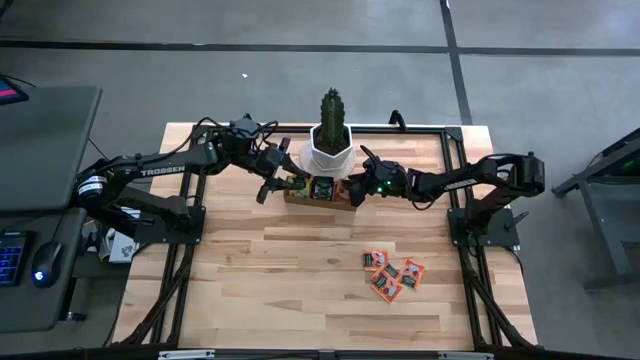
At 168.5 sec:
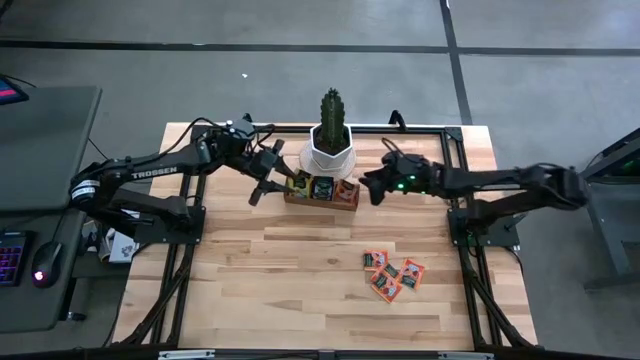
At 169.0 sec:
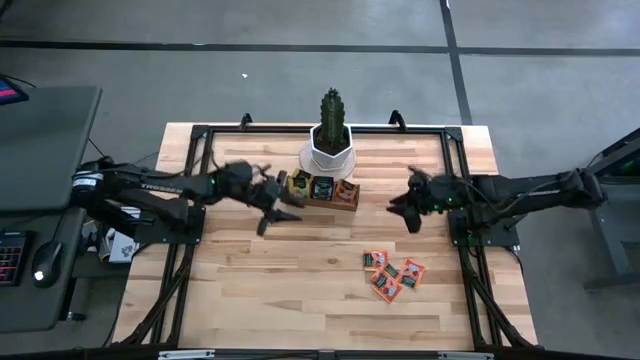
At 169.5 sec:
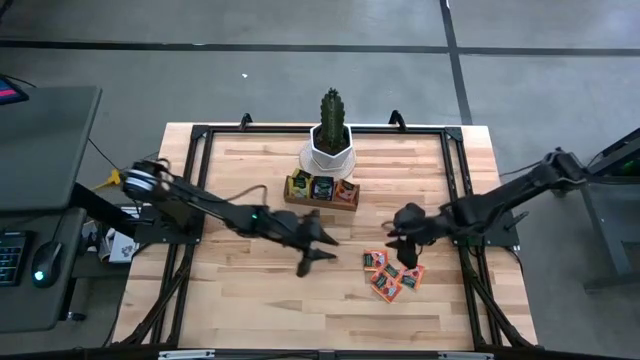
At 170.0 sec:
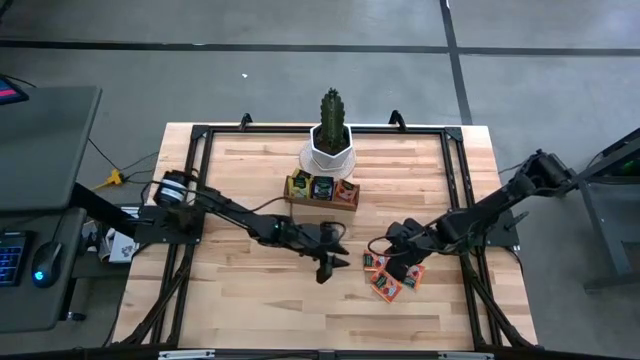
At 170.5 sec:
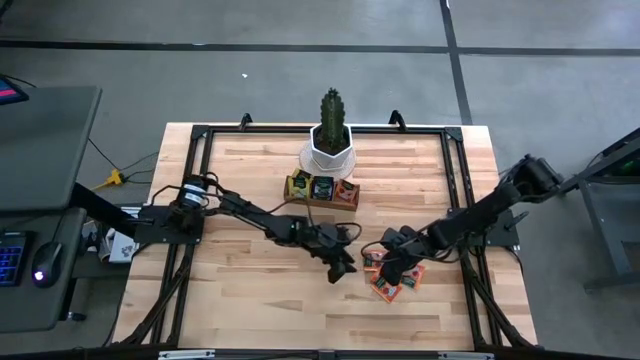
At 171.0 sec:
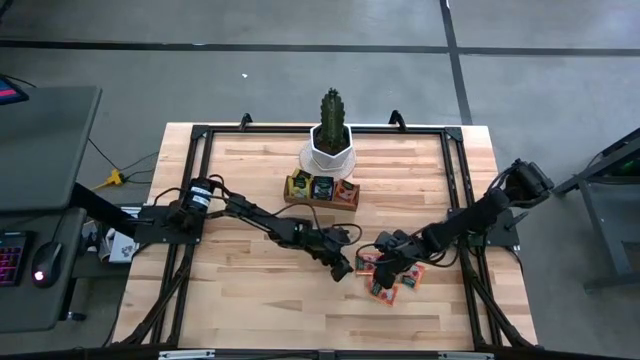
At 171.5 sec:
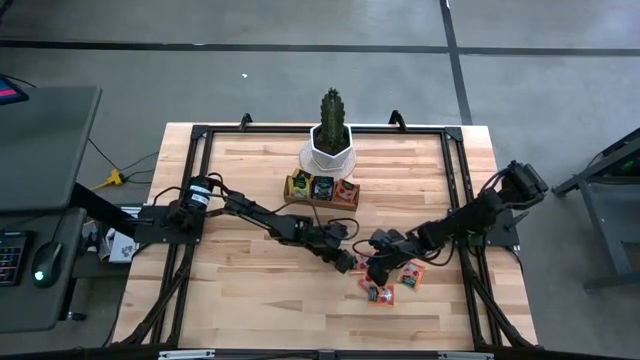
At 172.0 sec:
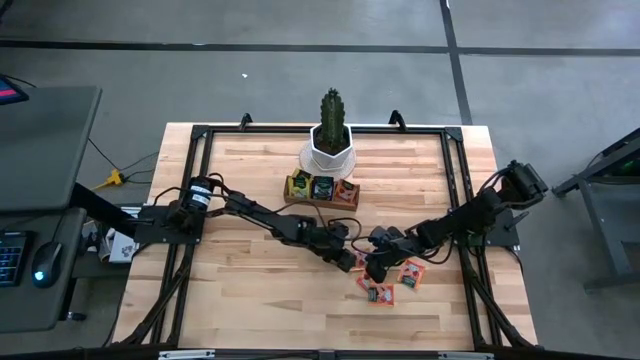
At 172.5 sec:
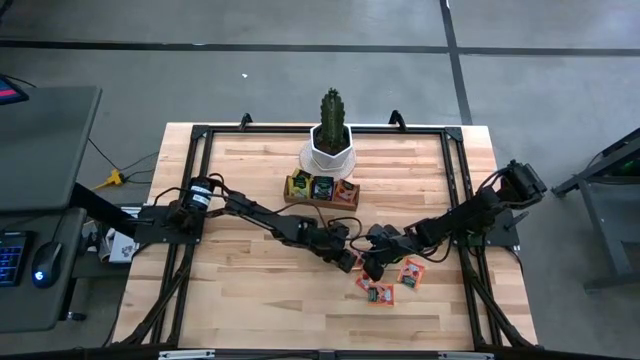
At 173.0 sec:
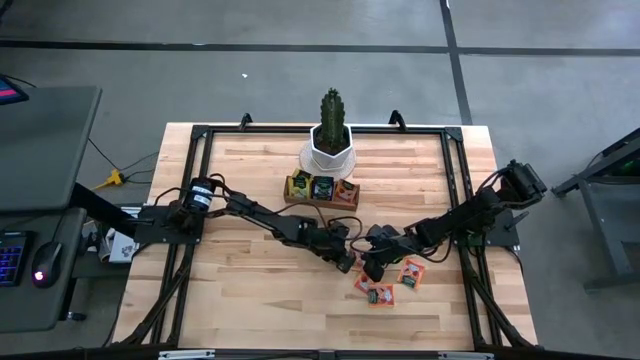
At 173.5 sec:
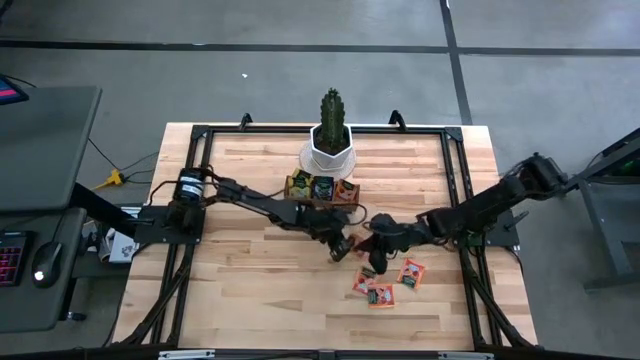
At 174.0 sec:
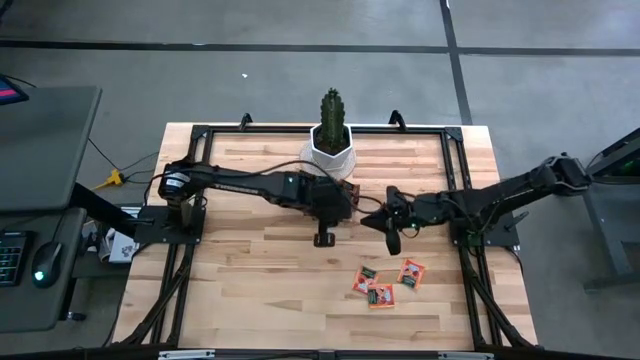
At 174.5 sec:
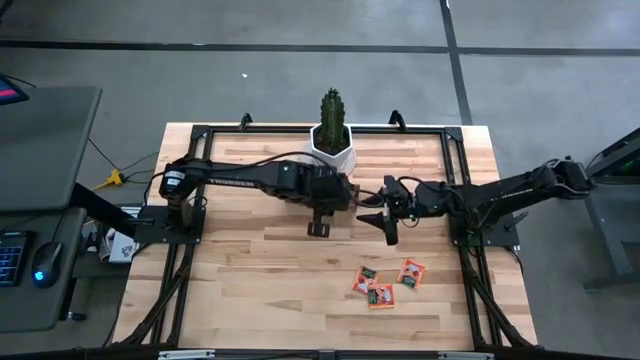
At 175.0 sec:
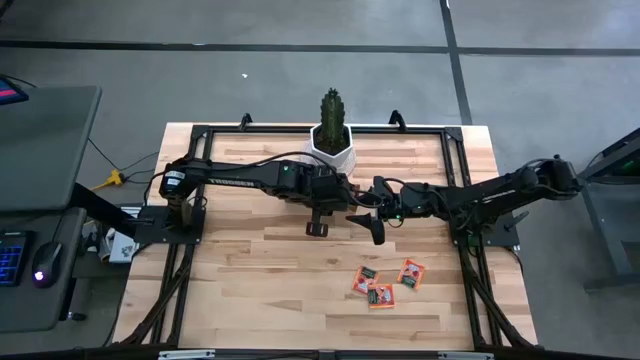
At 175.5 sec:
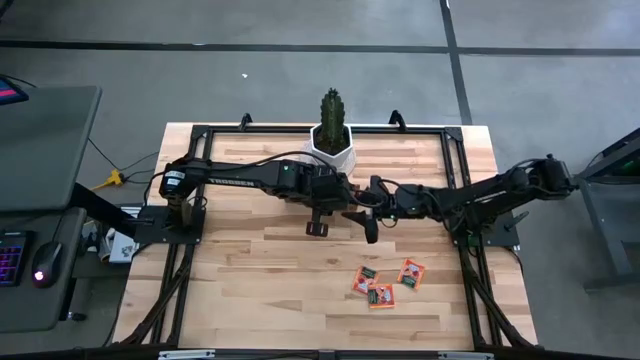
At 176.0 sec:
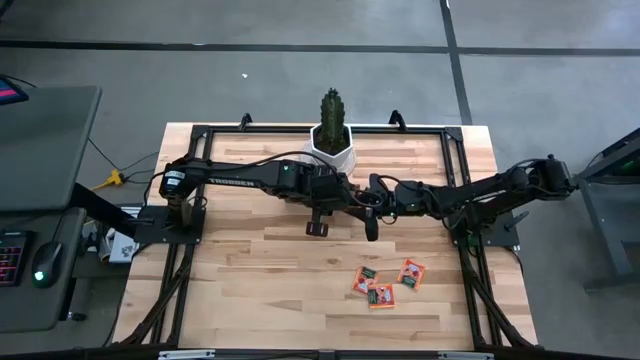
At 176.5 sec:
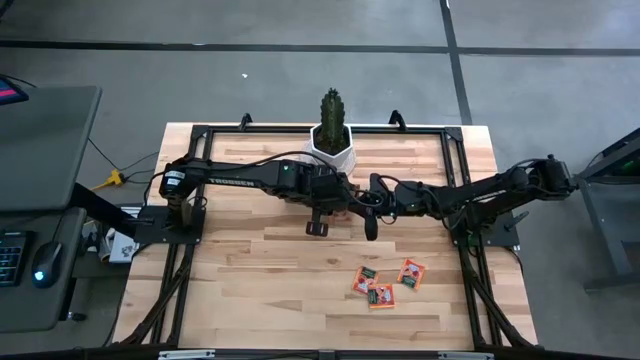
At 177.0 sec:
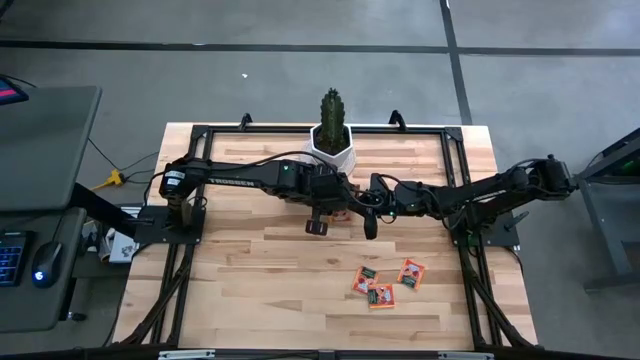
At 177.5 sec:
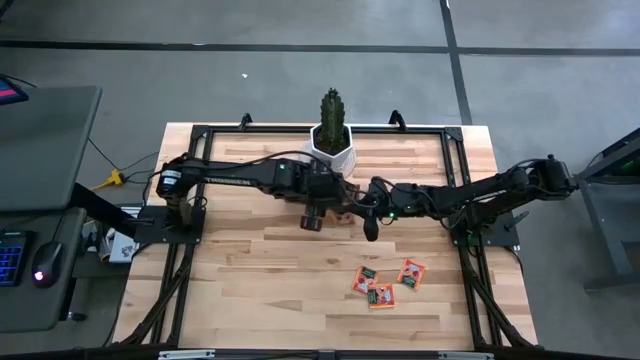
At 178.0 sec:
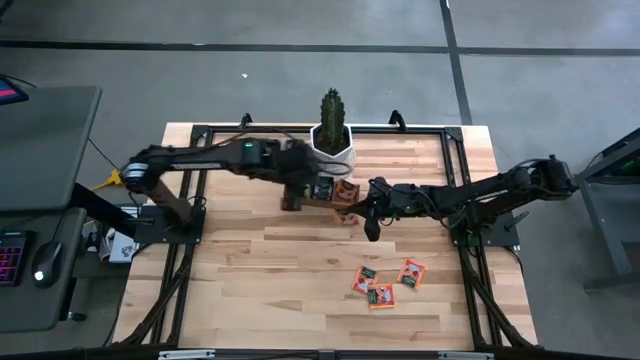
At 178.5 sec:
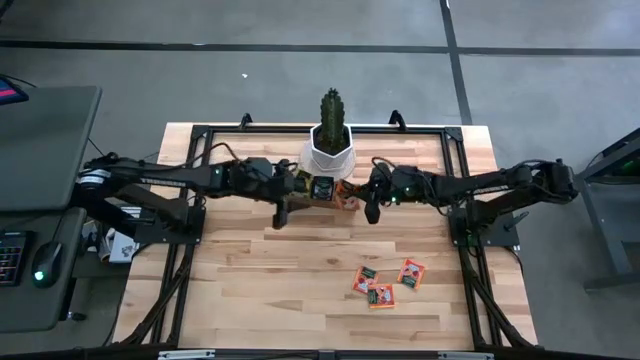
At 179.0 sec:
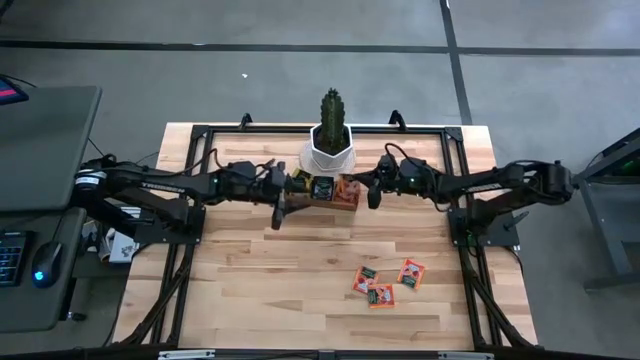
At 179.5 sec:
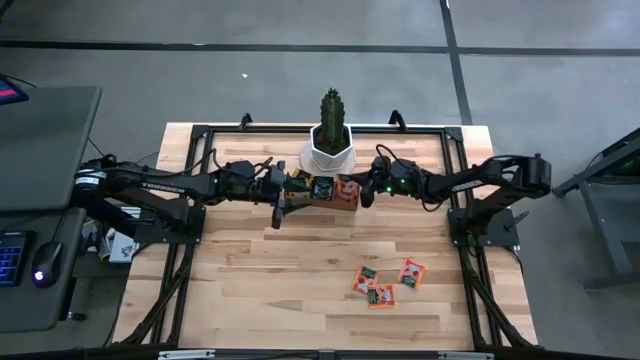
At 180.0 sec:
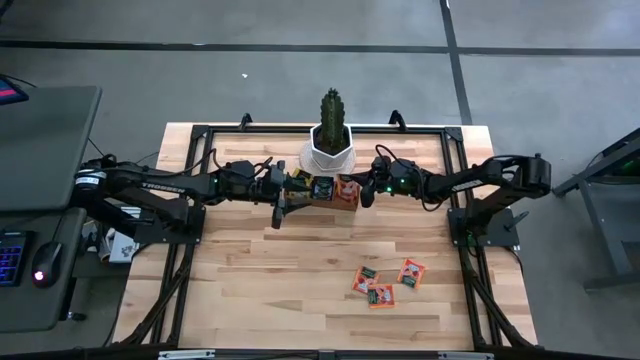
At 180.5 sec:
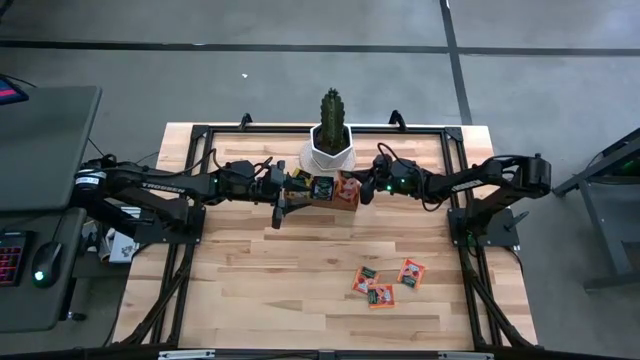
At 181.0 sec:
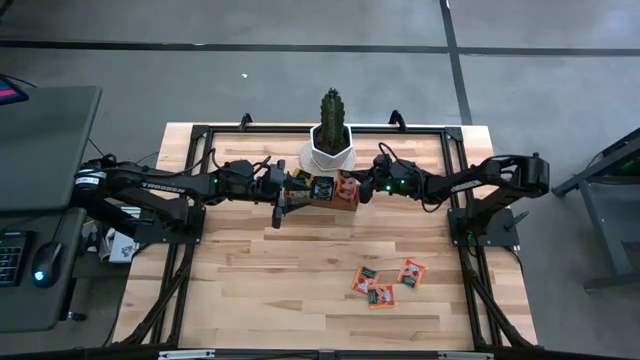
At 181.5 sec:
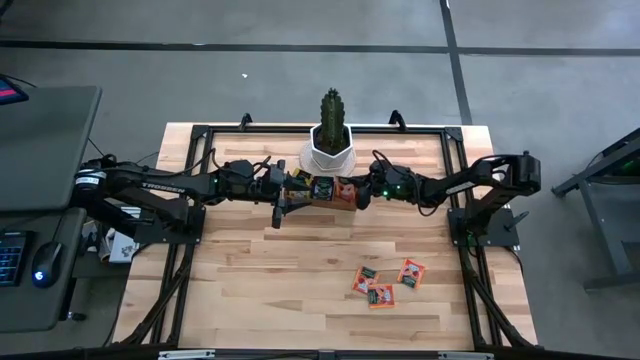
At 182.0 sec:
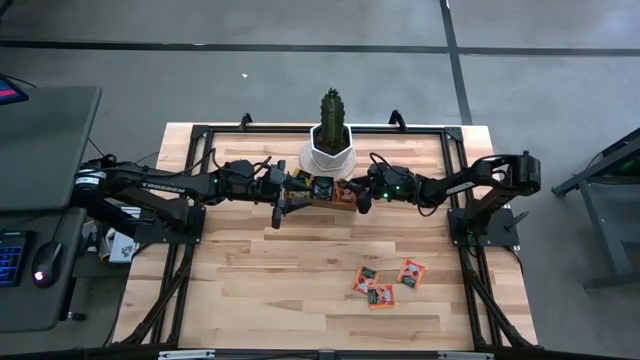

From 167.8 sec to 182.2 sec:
Task: Pick & Place Tea
Put the orange tea bag into the right section of the wooden organizer

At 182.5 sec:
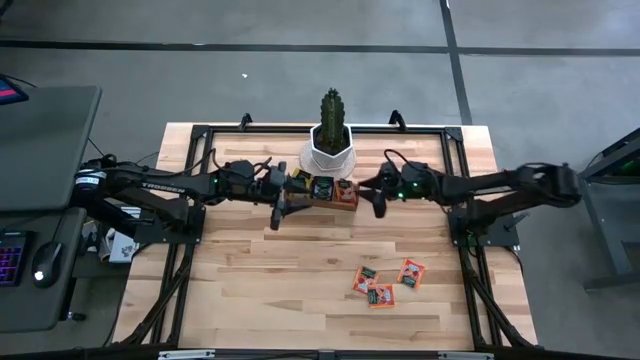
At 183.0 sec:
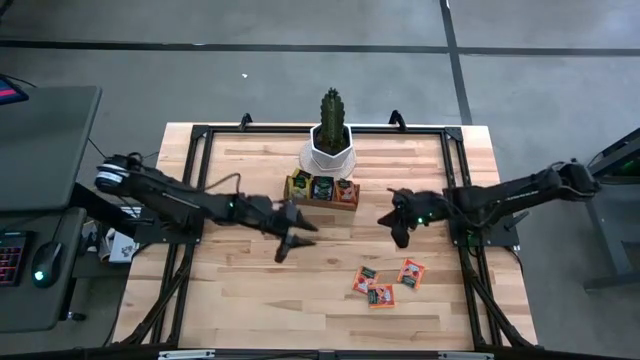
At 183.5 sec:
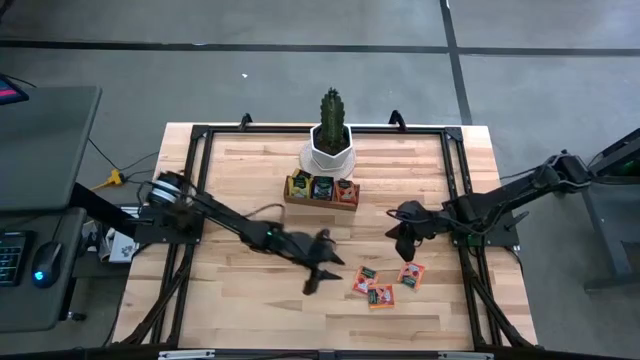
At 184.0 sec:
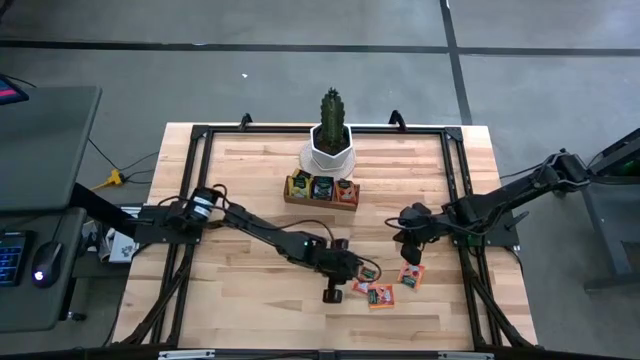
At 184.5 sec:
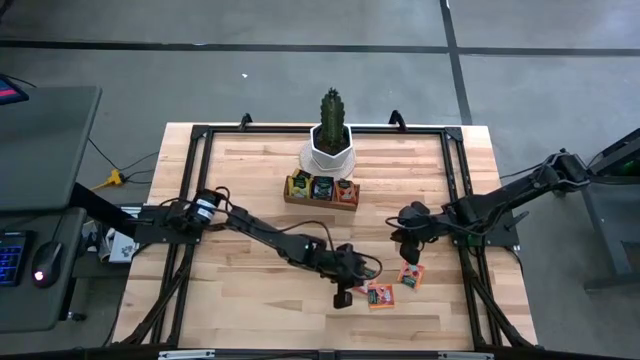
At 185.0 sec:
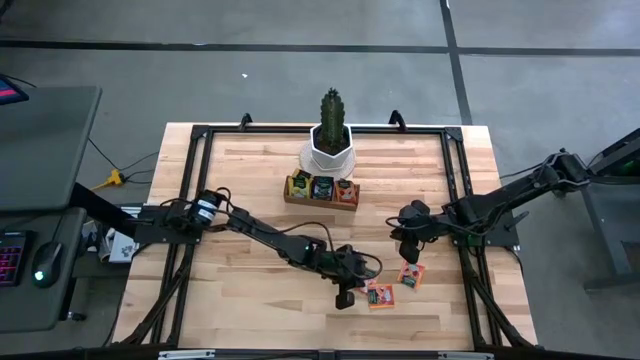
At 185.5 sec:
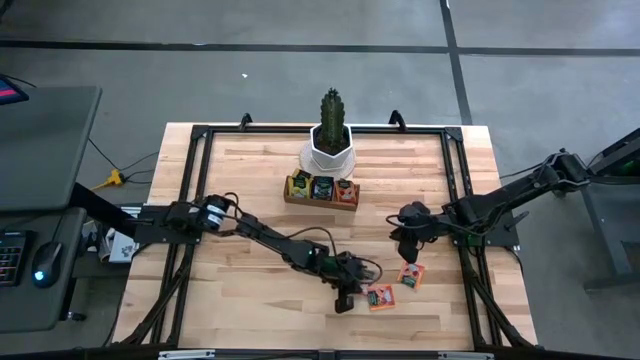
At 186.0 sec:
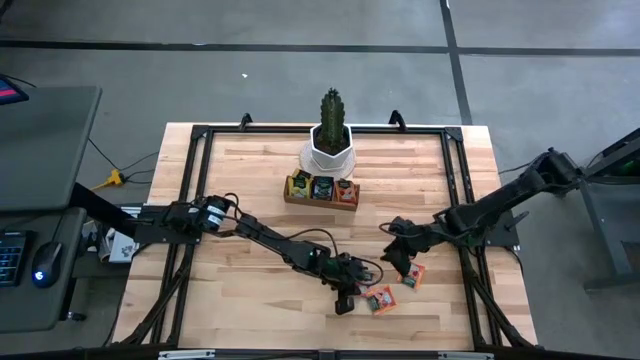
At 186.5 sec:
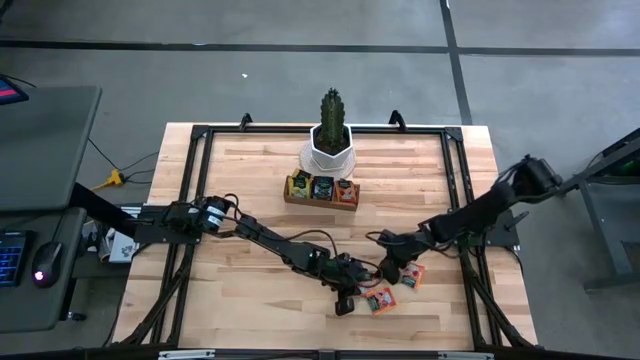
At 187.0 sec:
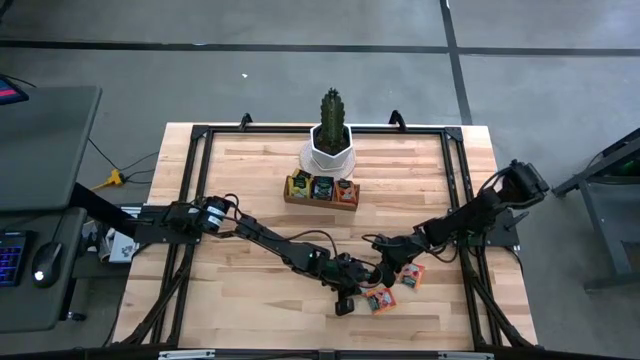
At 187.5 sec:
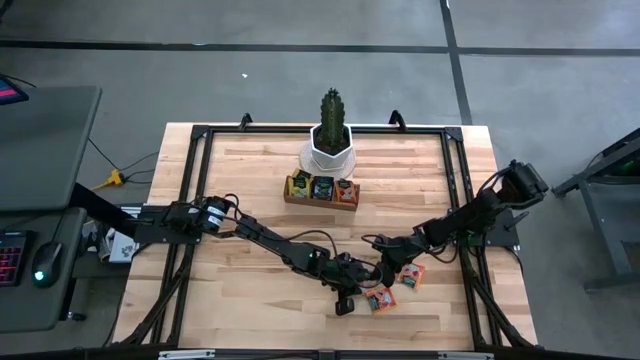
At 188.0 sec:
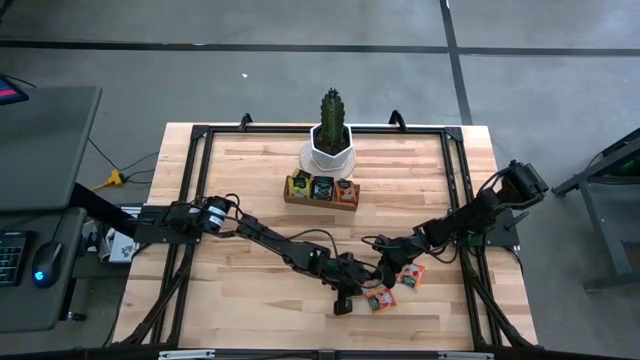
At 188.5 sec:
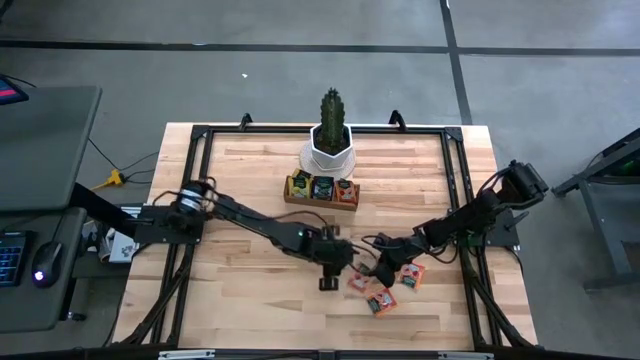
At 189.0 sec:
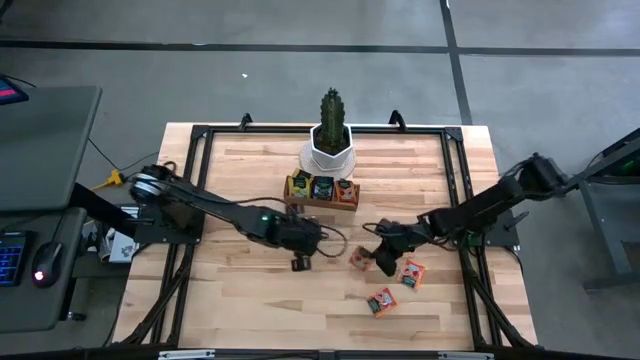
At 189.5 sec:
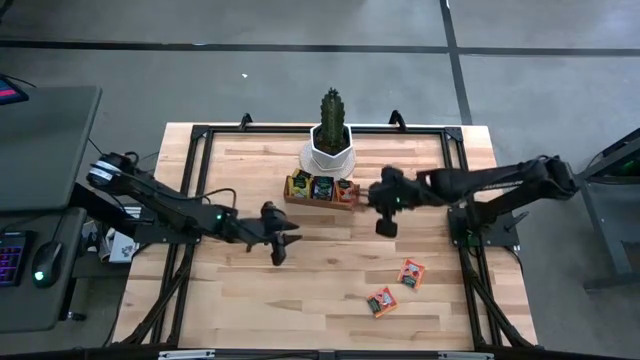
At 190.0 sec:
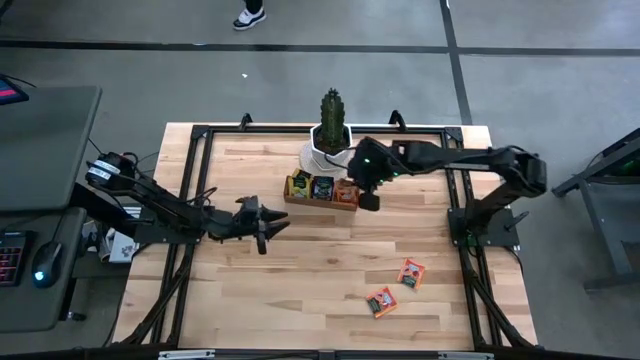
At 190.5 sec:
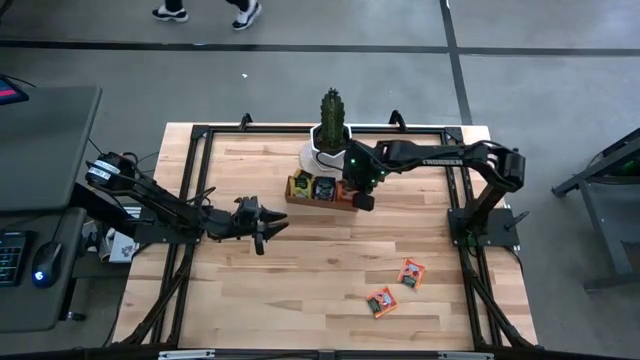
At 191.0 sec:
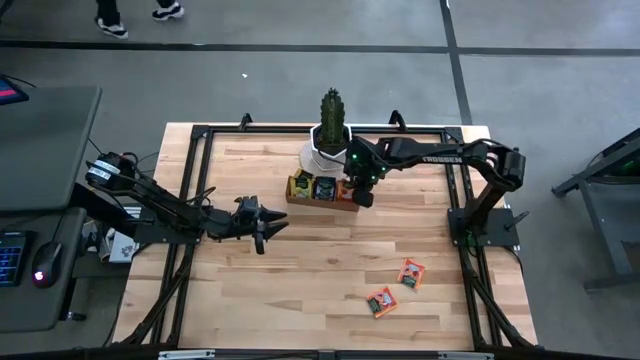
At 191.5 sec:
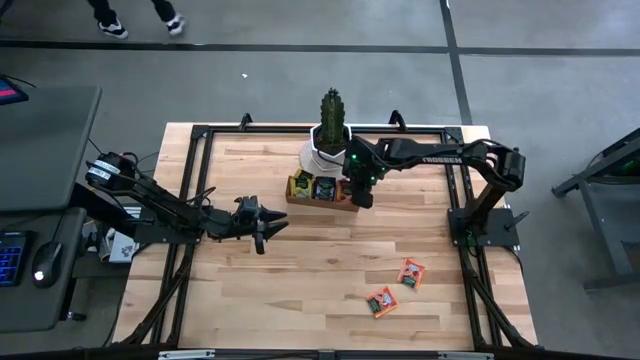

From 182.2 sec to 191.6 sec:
Put the orange tea bag into the right section of the wooden organizer
